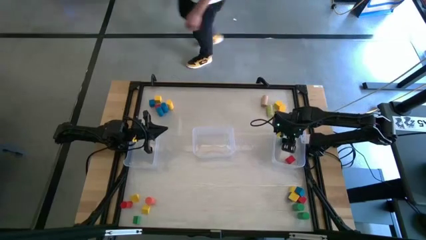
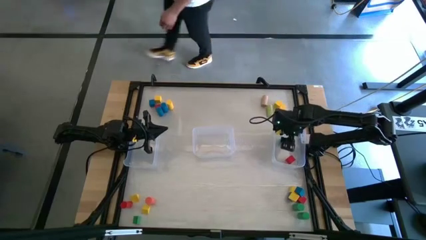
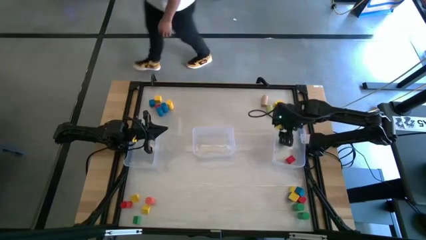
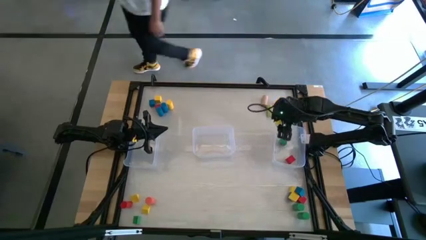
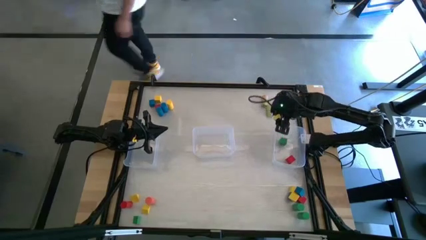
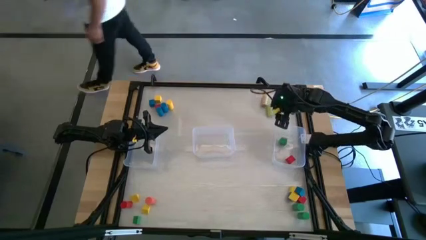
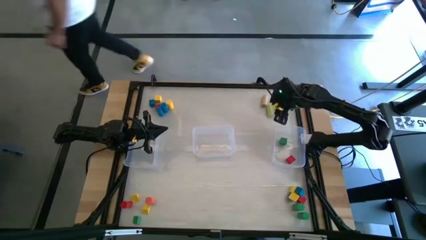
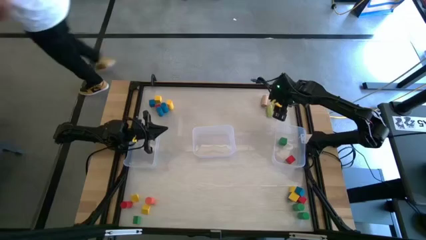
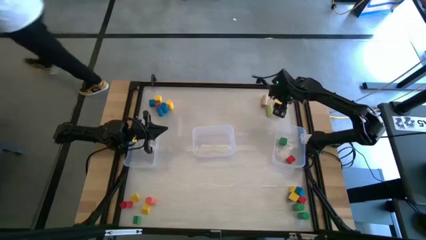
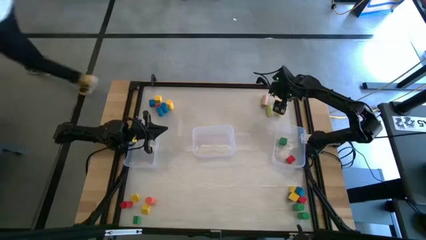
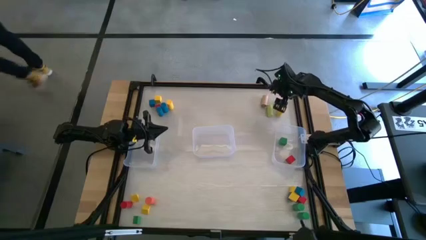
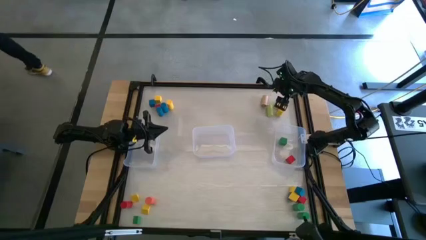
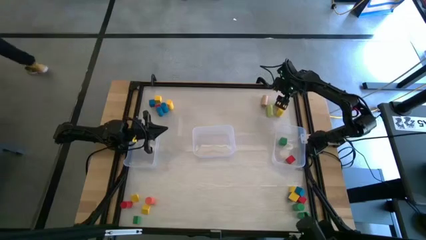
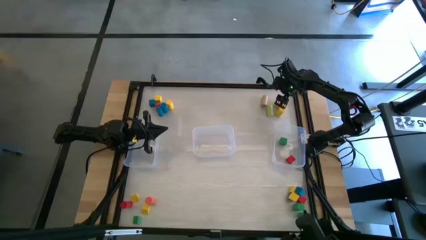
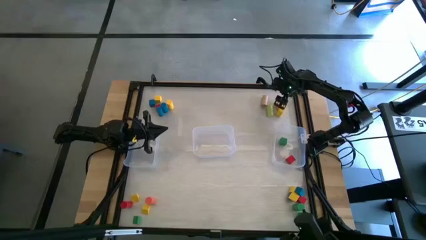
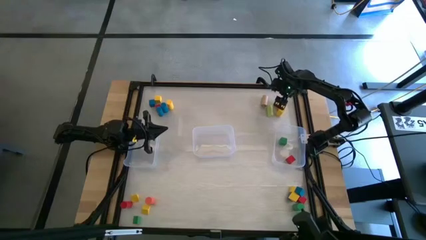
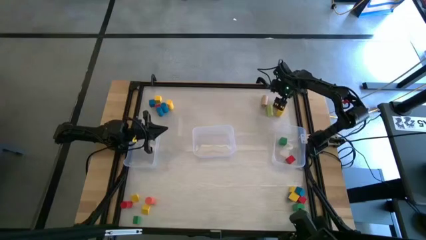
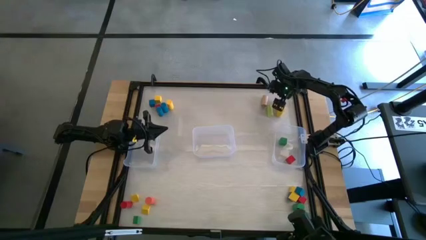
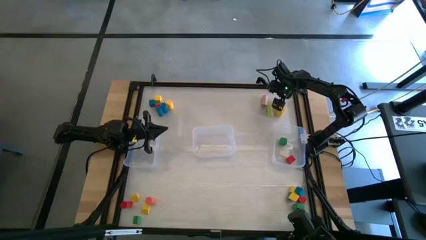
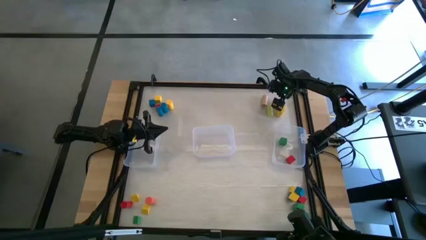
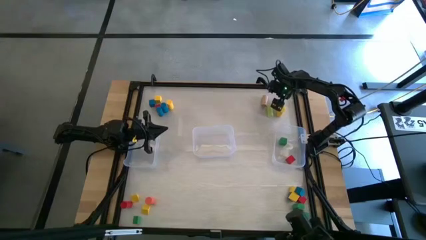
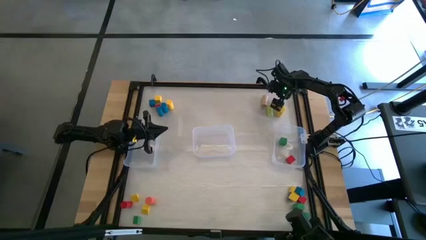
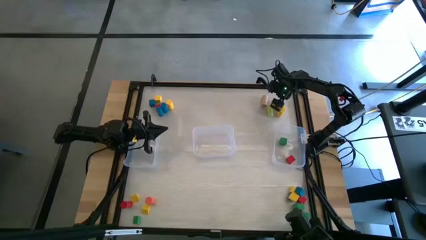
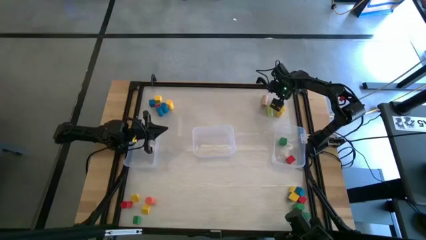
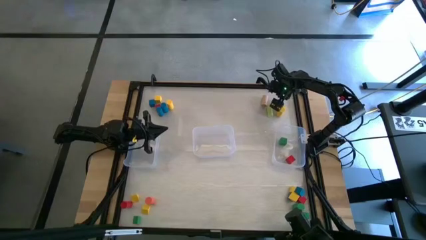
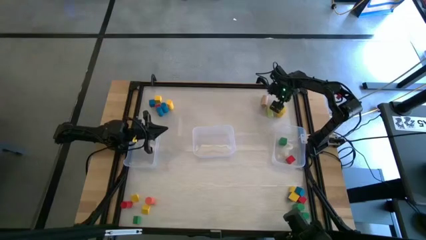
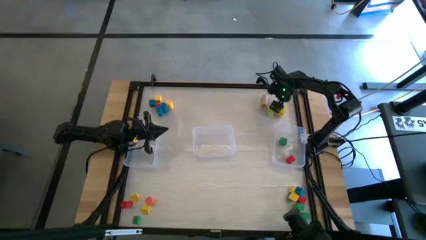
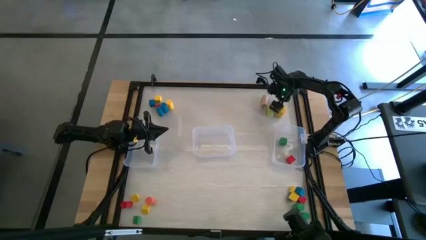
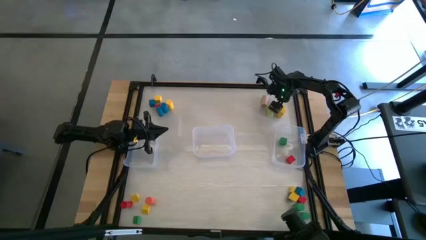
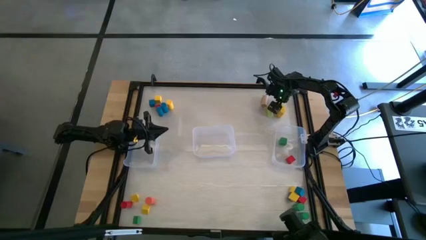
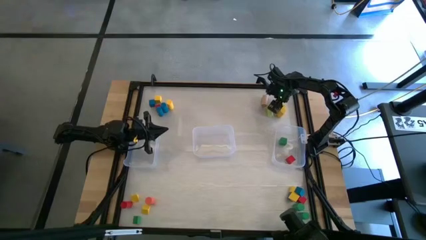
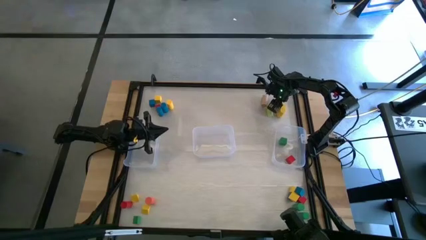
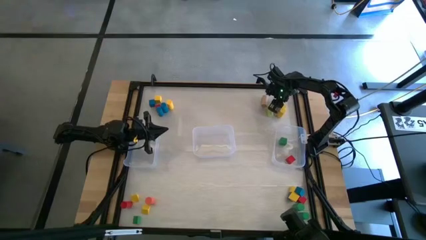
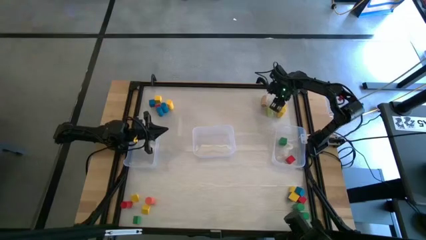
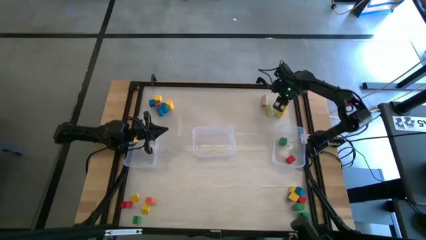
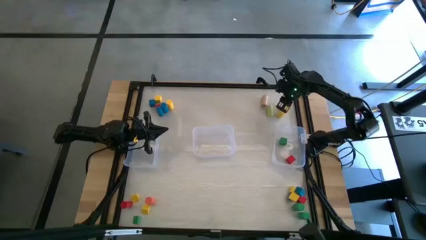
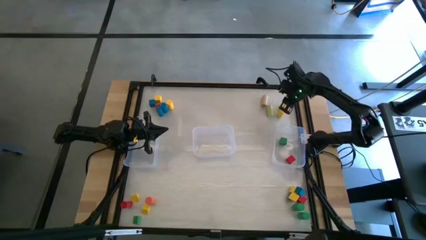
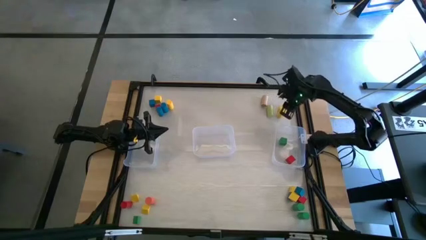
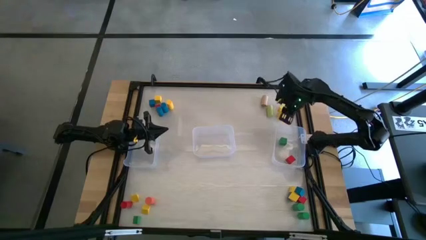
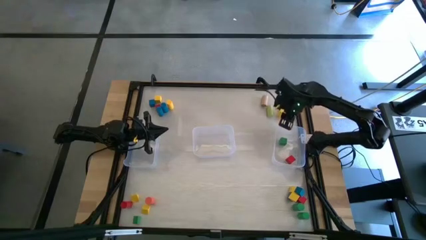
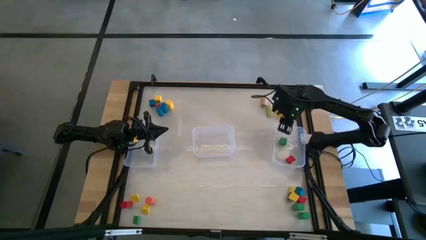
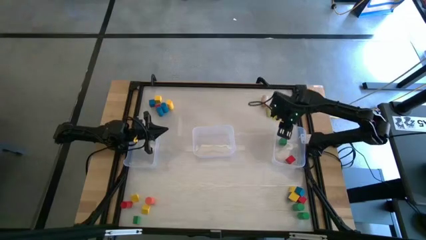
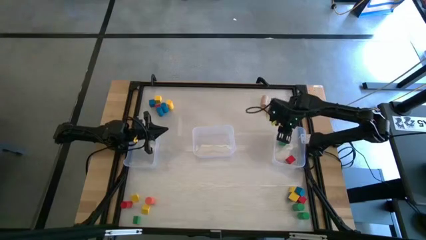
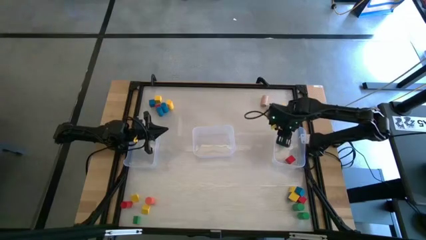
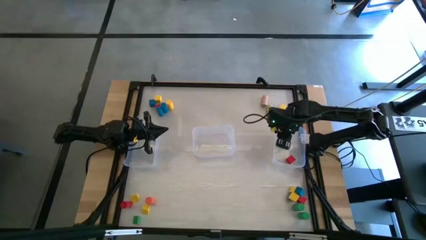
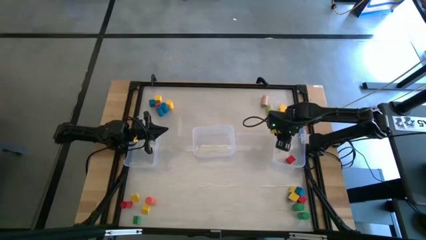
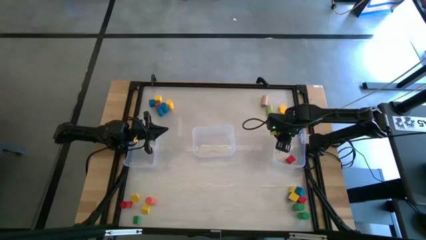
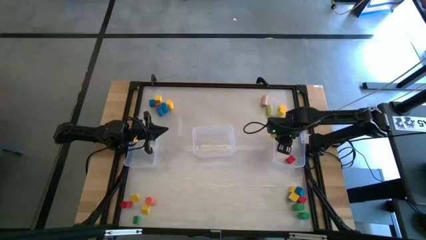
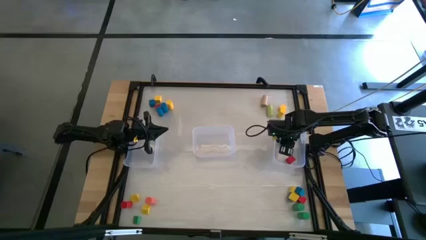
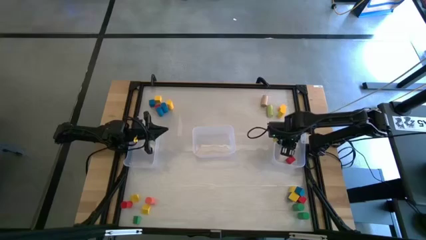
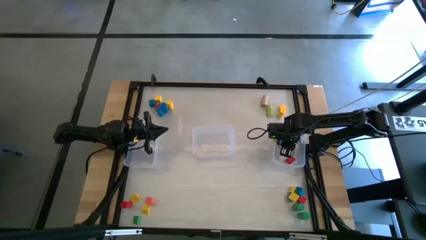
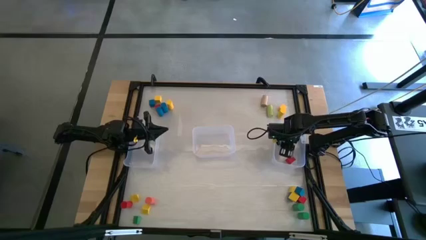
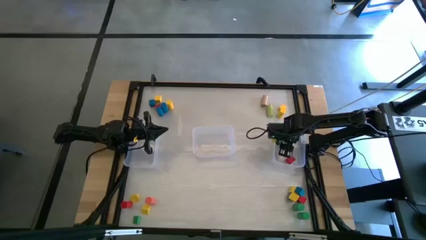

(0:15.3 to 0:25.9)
Task: Sort blocks by size
Put the yellow cube block into the right transparent bin

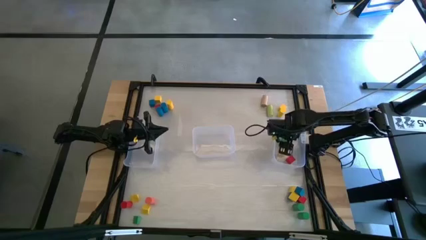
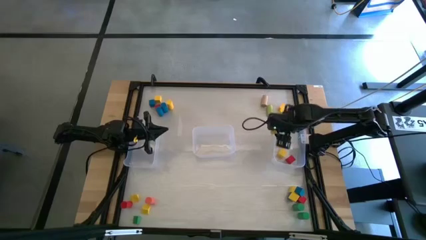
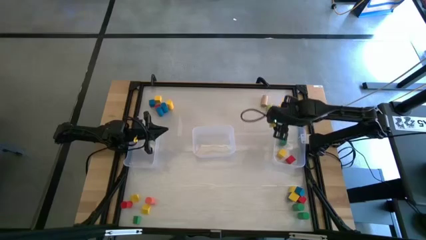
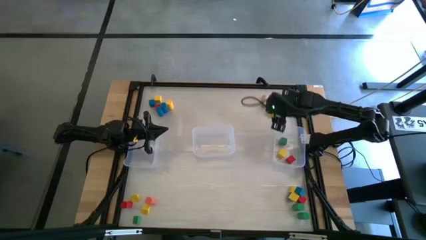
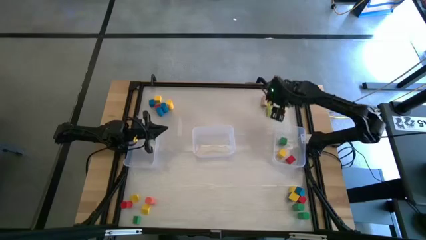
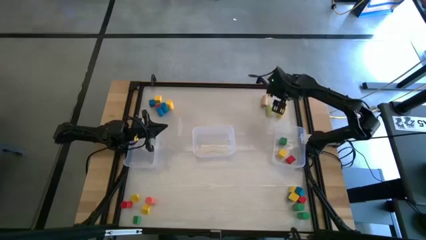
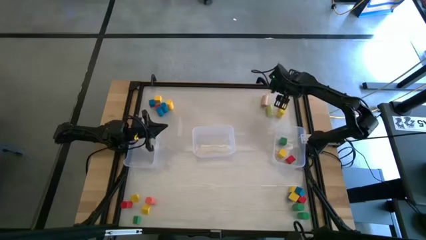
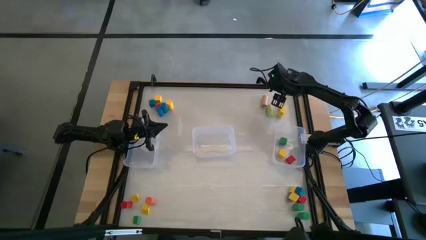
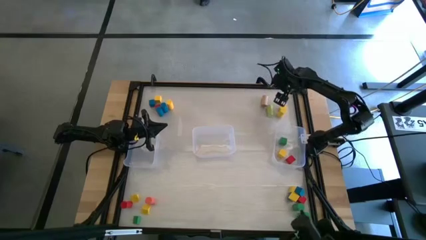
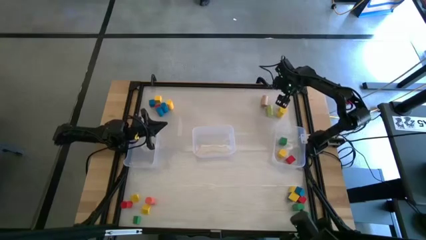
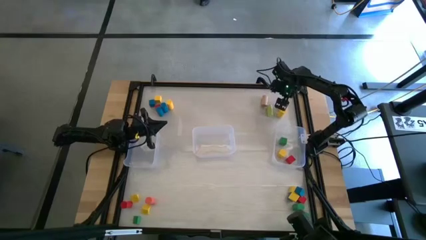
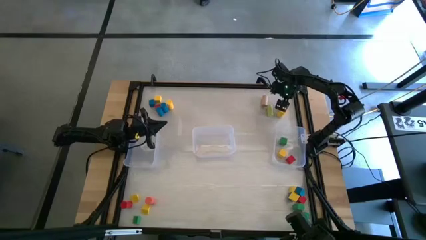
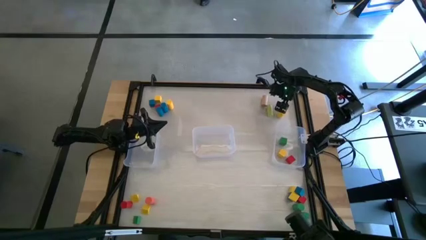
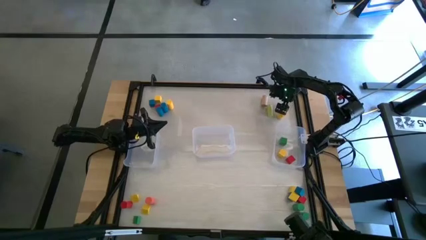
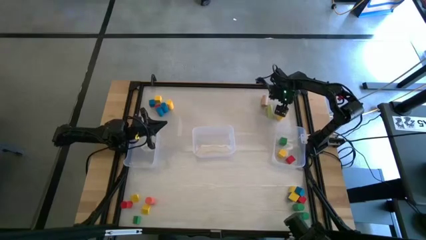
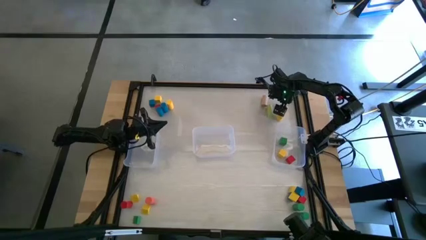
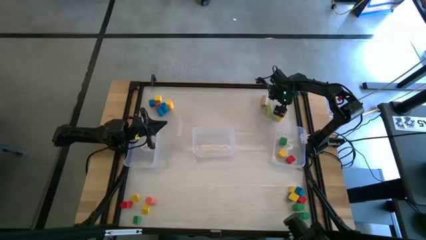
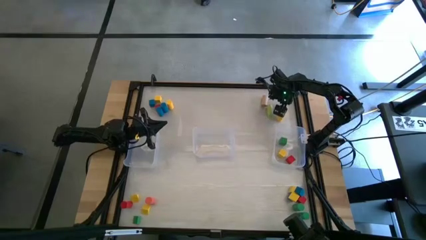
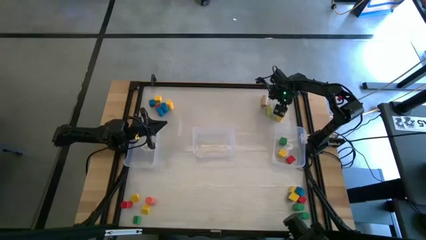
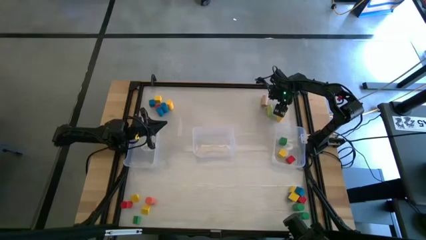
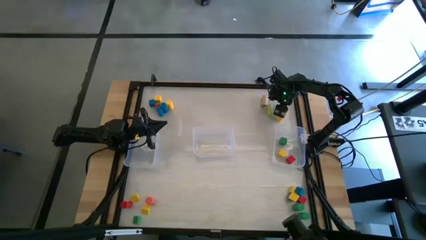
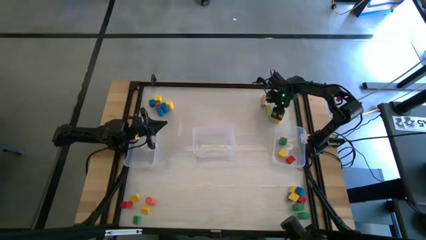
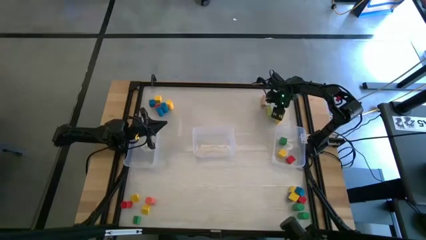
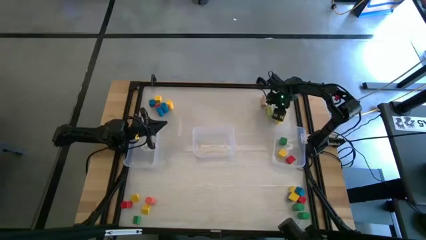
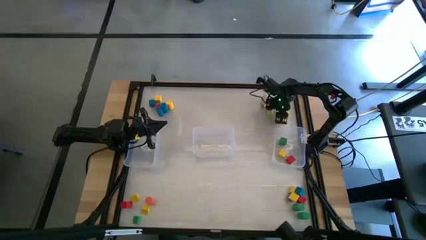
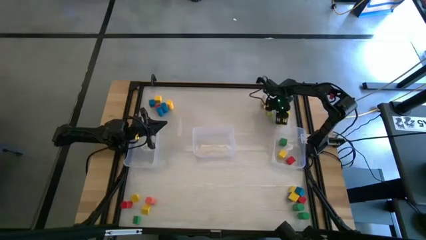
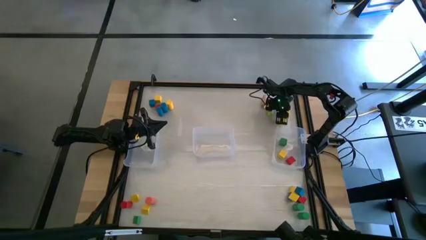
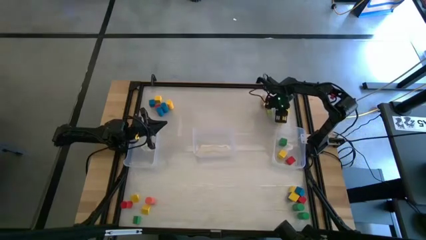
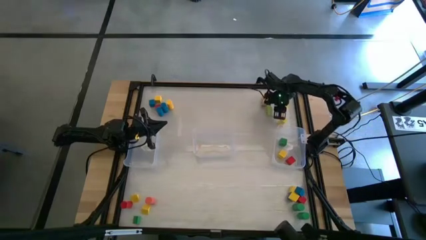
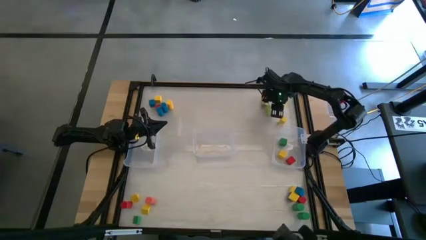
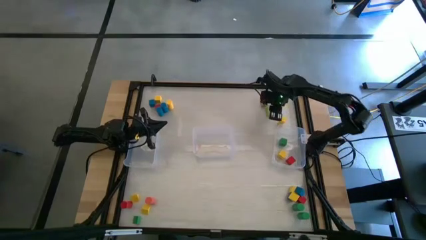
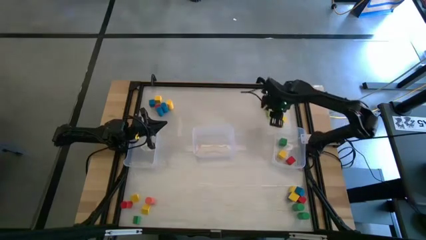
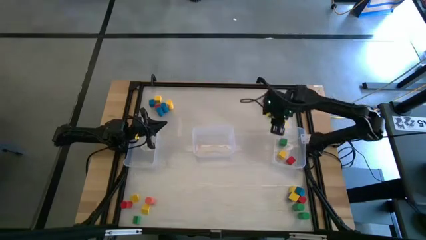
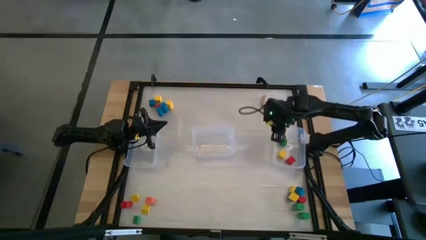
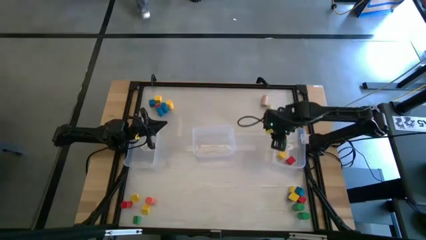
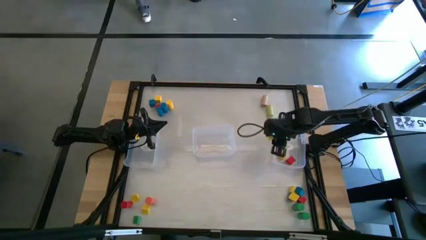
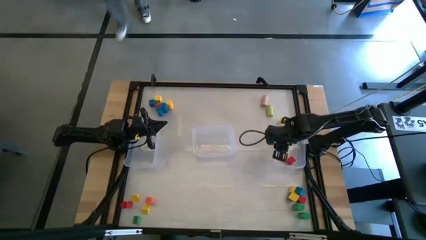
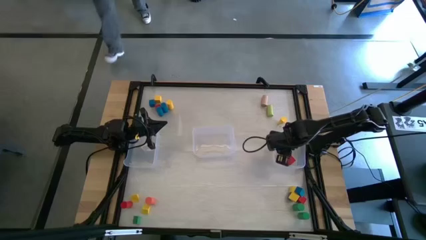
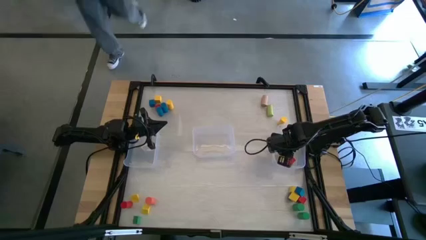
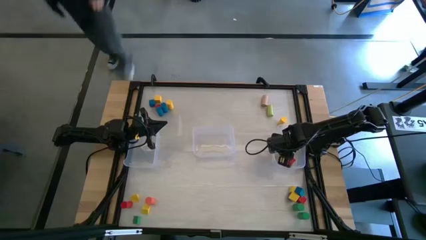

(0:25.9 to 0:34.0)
Put the yellow cube block into the right transparent bin
